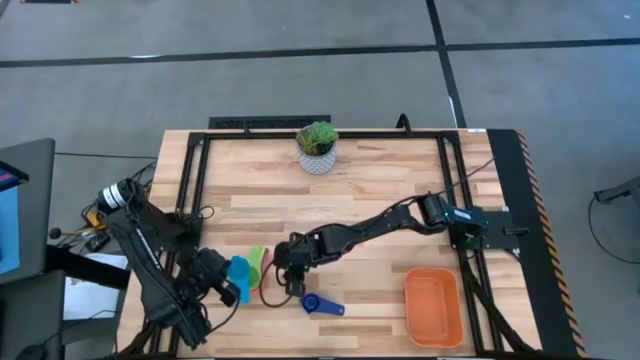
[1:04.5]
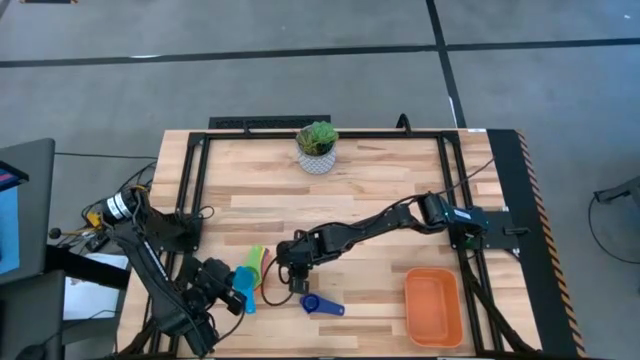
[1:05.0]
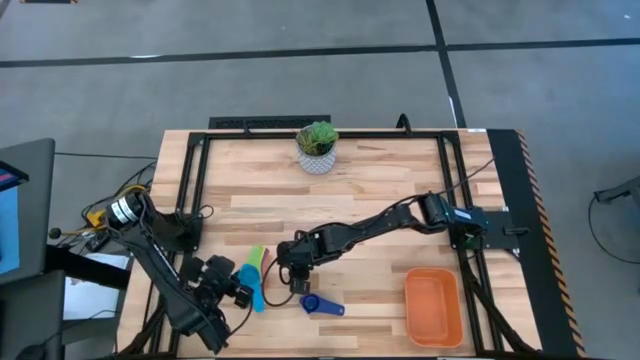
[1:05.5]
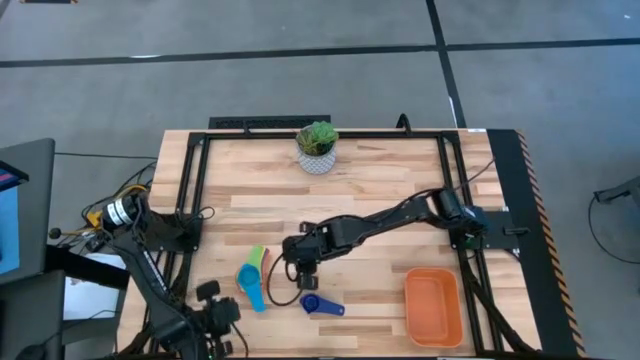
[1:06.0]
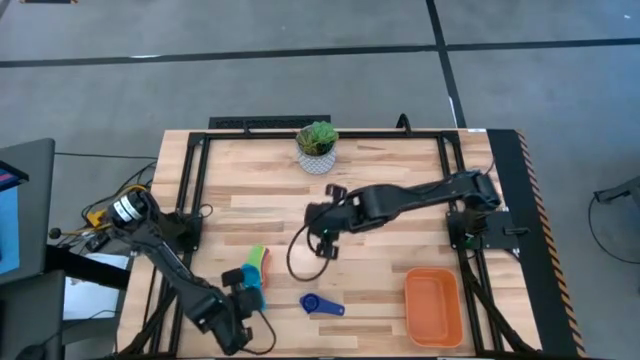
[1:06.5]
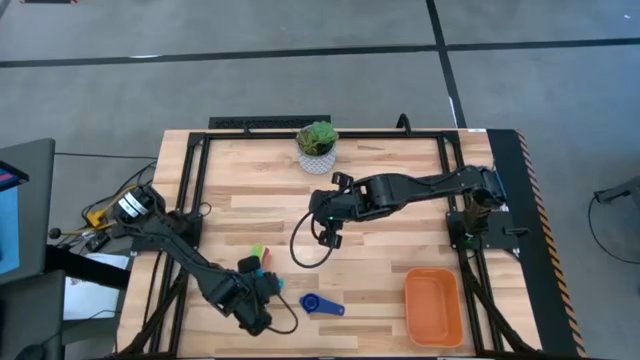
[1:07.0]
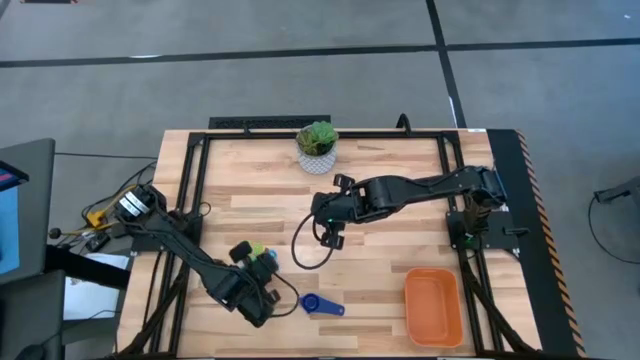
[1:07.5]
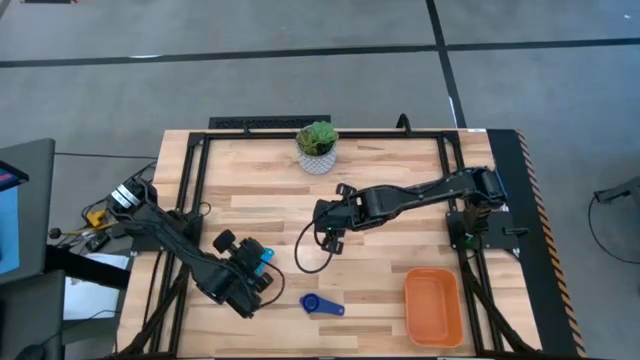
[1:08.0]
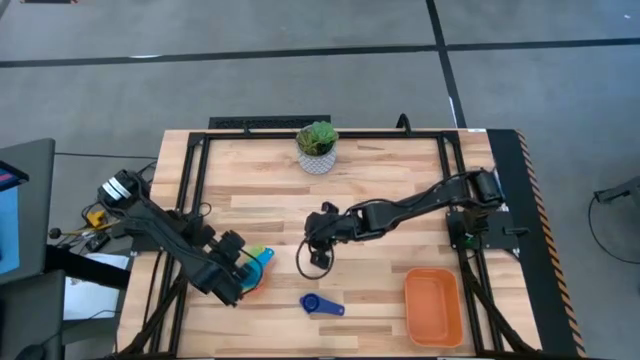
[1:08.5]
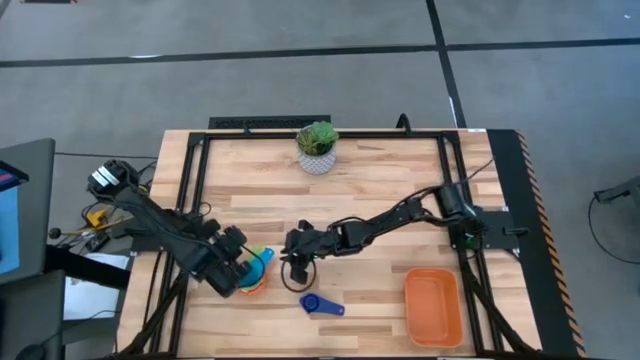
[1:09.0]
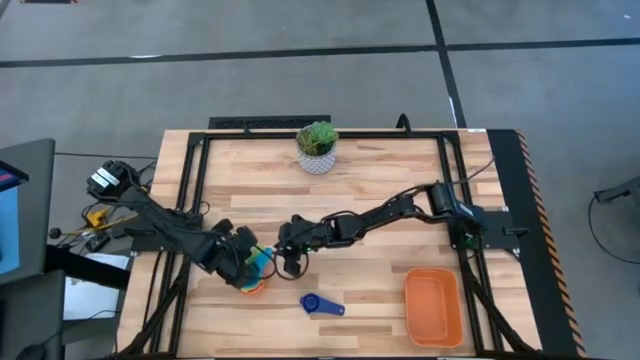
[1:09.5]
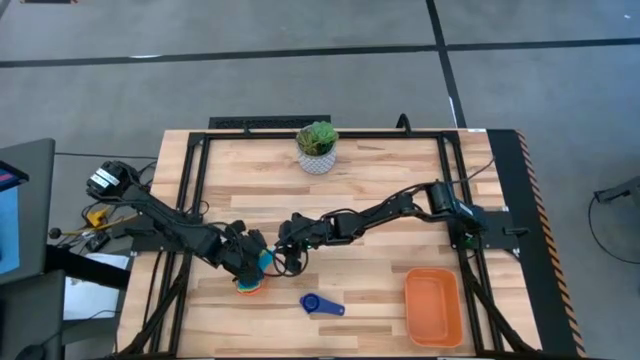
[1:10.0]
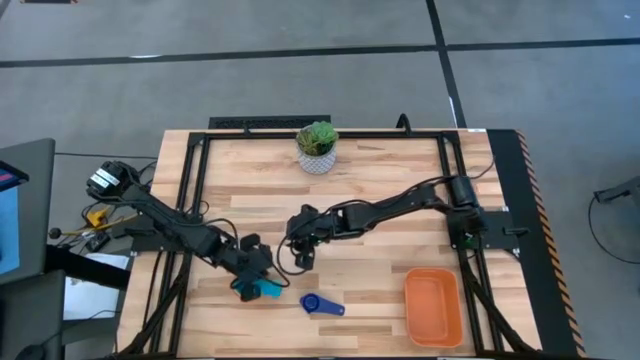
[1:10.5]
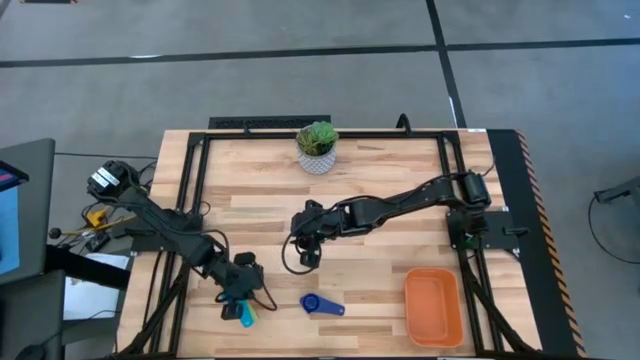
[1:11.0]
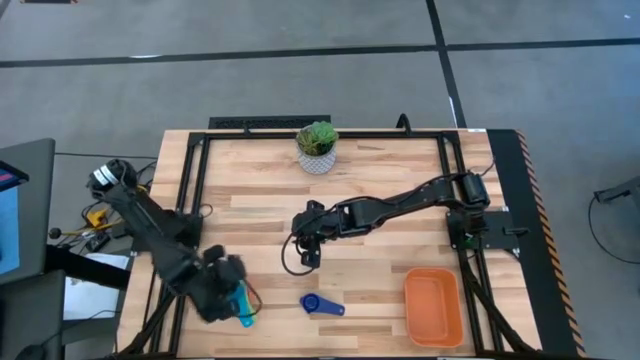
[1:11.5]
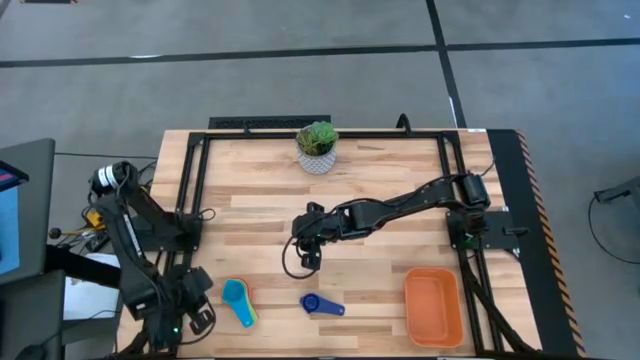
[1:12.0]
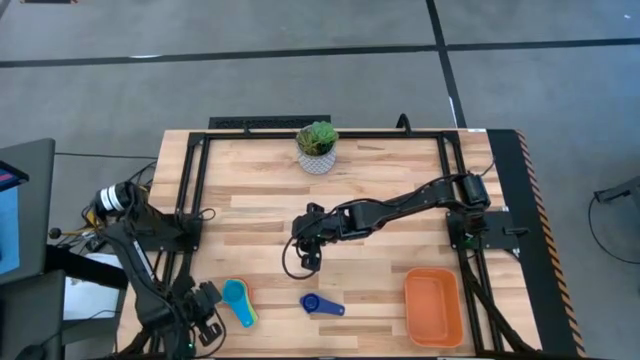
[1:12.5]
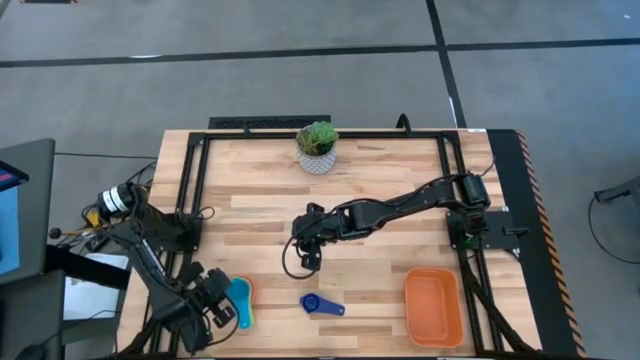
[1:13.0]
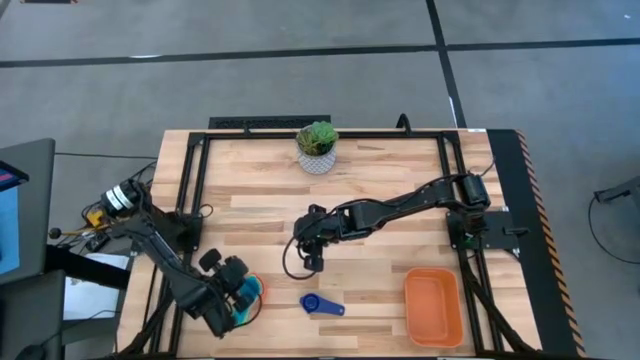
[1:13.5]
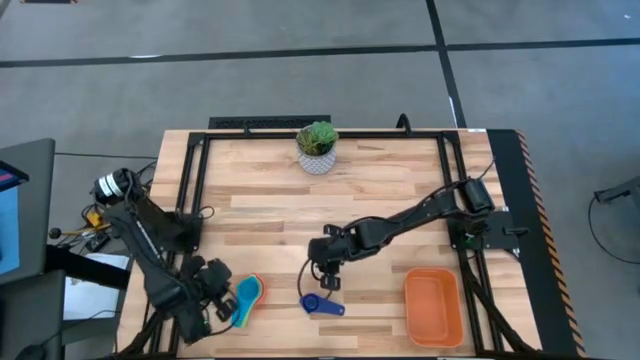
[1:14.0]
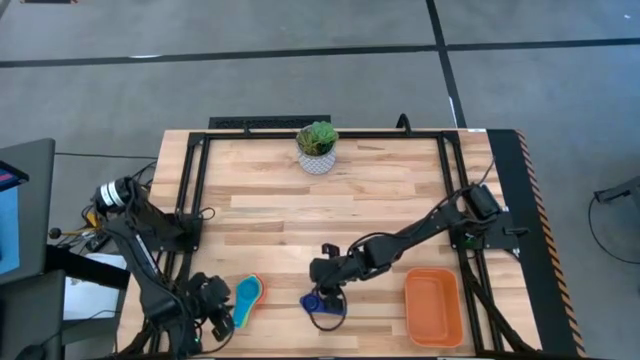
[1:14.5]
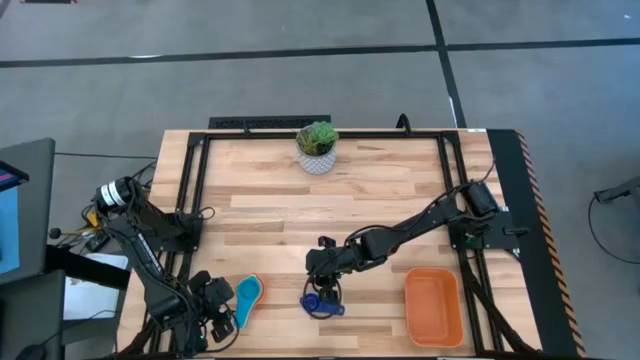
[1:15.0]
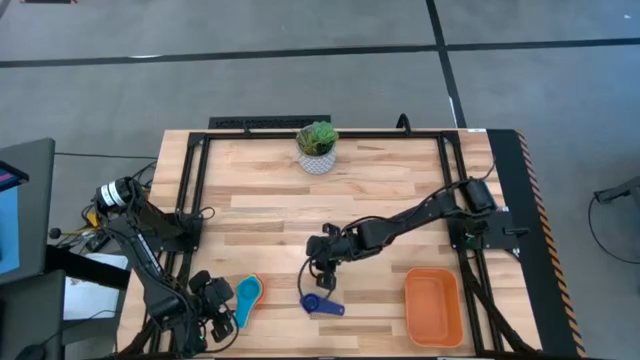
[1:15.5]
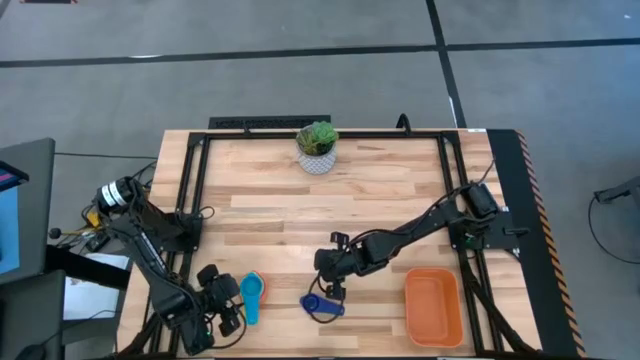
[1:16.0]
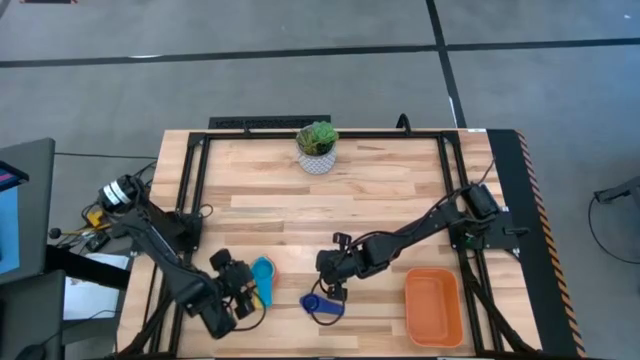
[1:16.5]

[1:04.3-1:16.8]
Task: Nest measuring cups in basket
Stack the blue measuring cup on top of the green measuring cup

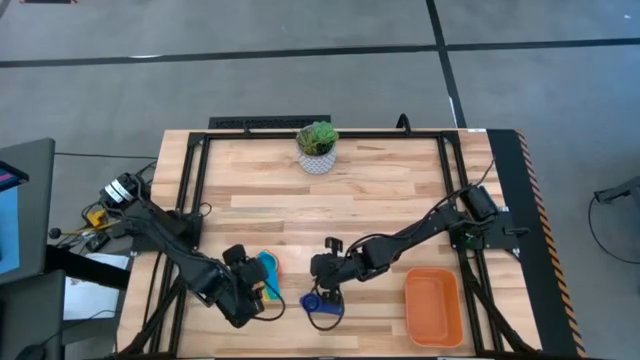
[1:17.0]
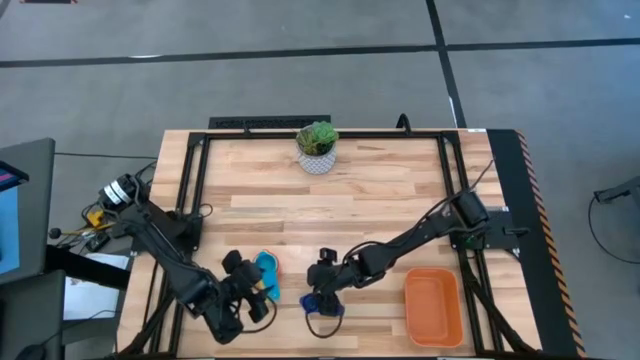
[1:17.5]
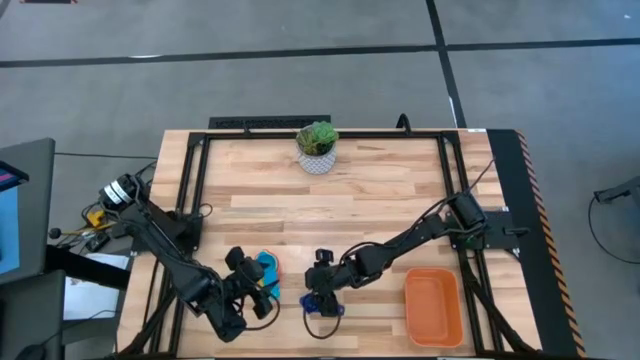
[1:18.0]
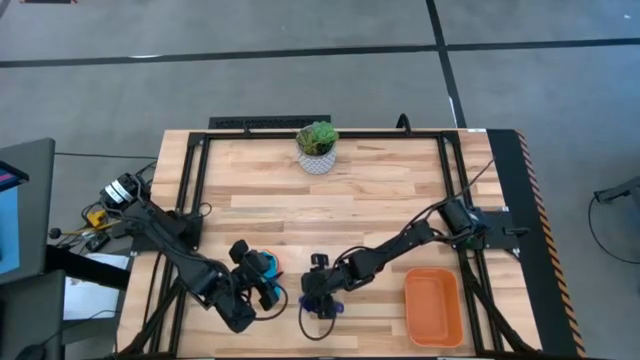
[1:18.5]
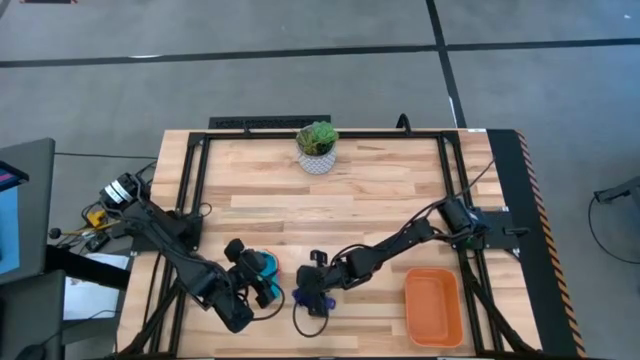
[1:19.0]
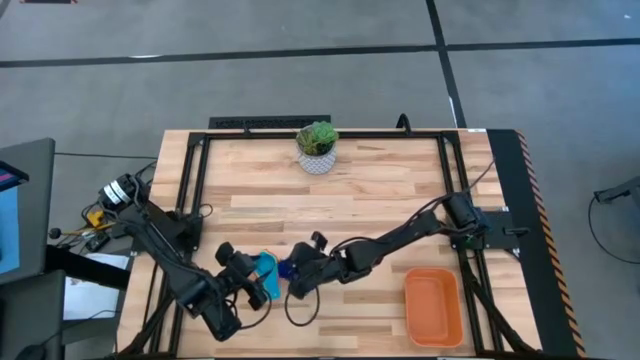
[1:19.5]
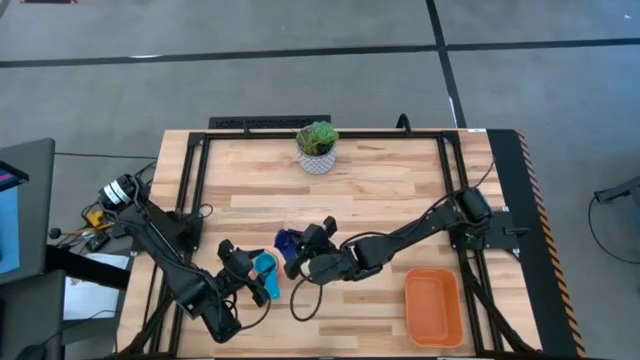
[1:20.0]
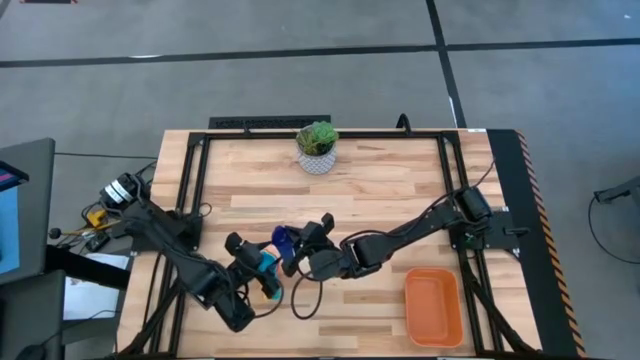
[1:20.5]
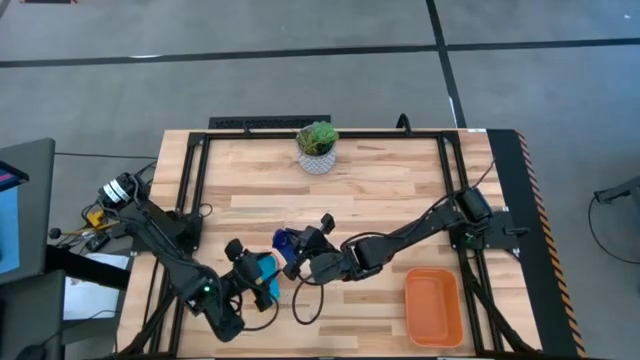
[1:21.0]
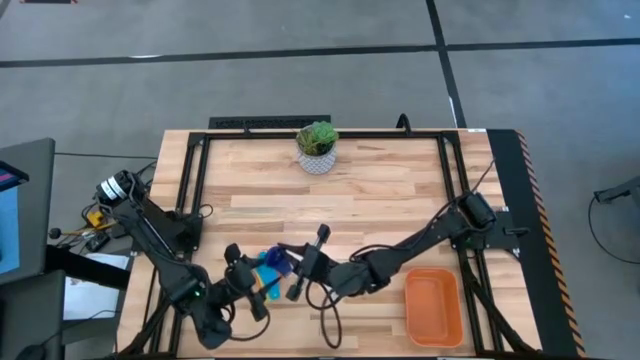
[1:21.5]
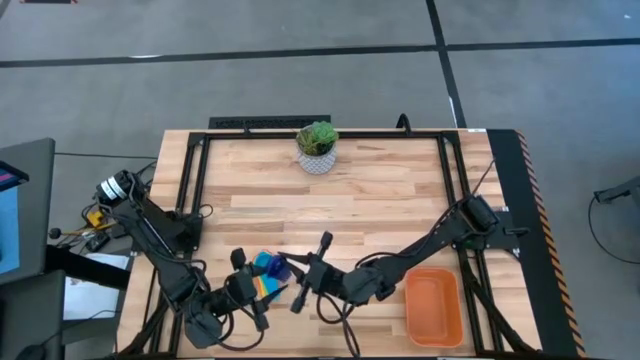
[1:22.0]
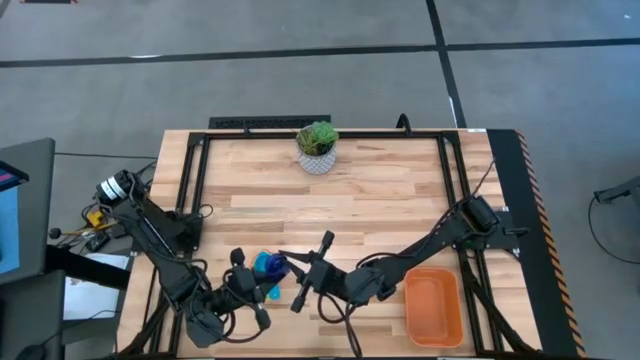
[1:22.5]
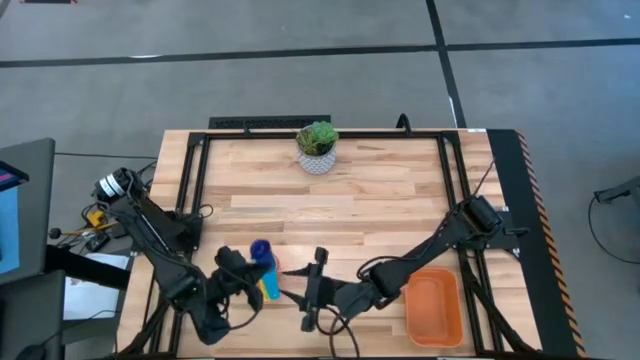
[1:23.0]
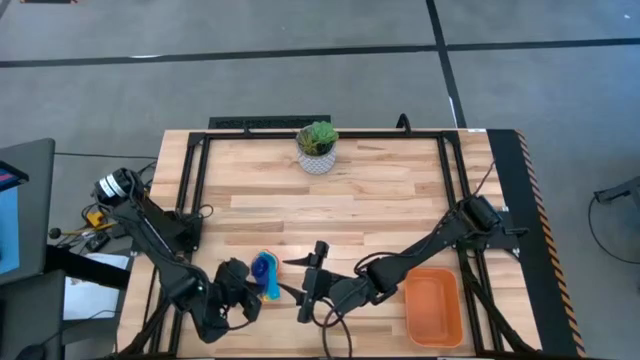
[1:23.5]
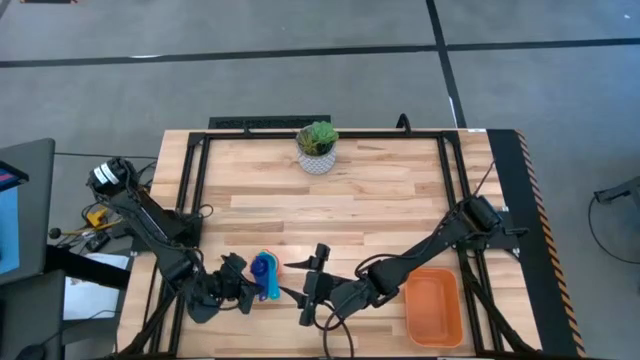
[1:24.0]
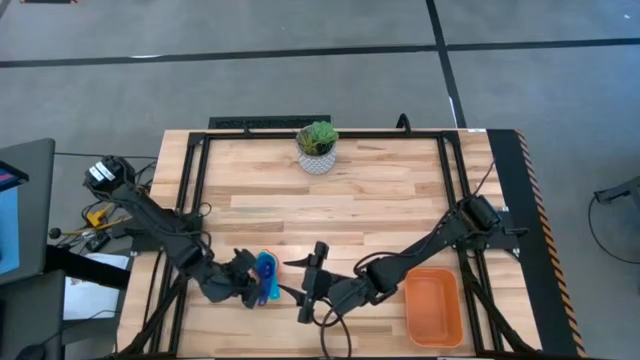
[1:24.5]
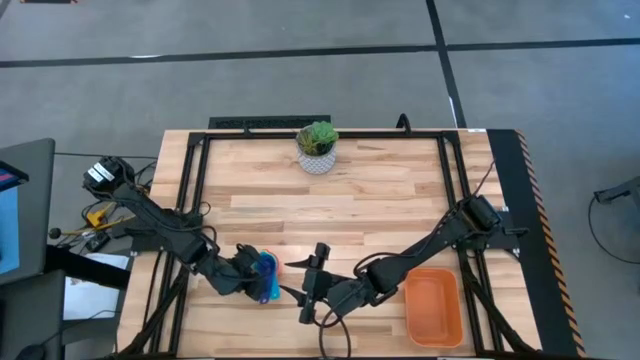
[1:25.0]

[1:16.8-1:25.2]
Stack the dark blue measuring cup on top of the blue measuring cup

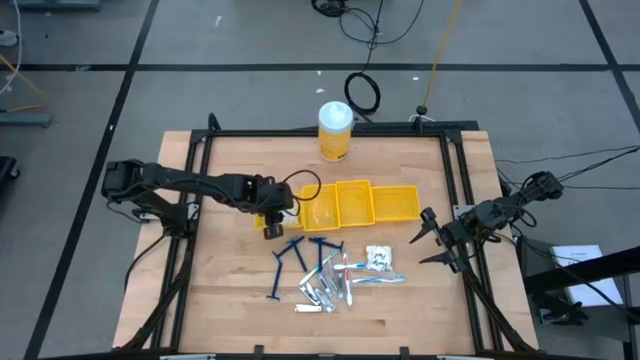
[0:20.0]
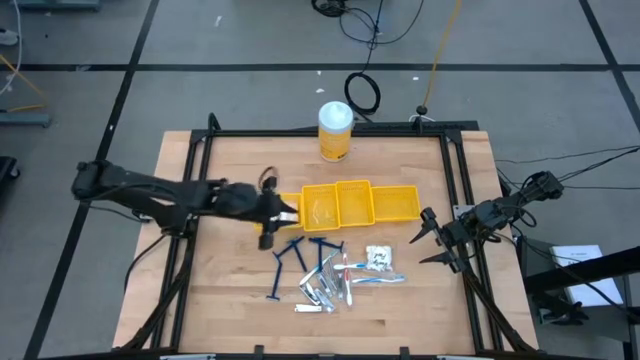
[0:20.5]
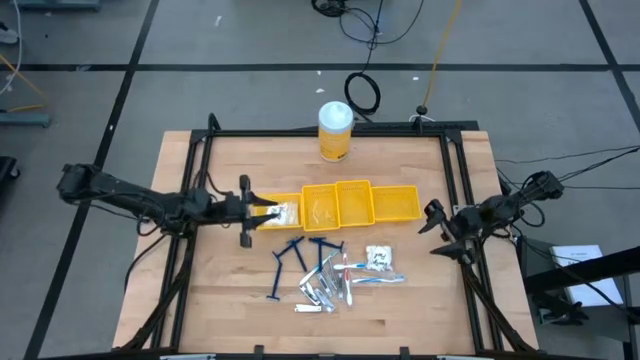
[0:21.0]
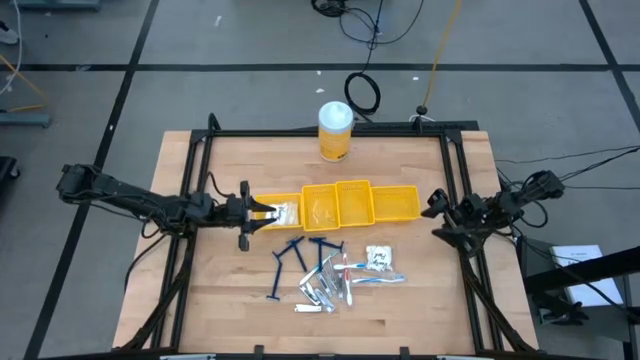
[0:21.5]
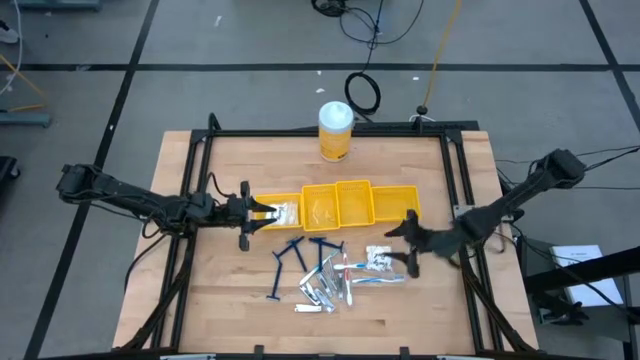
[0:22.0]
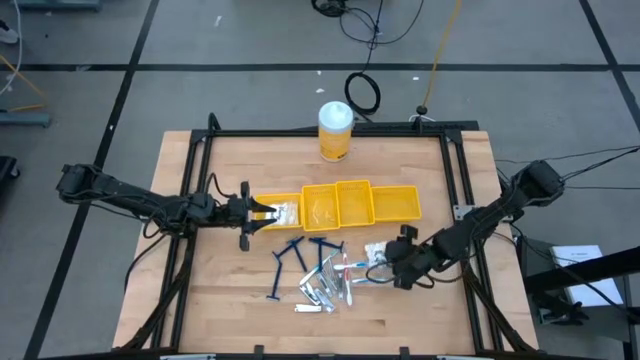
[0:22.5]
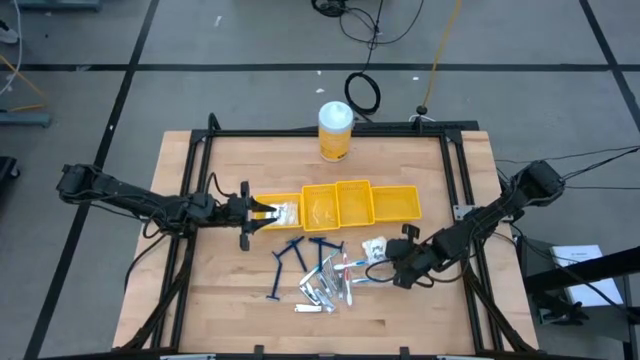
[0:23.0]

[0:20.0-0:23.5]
Task: Pick & Place Travel size toiletries
Put the vanity pack into the left yellow bin
